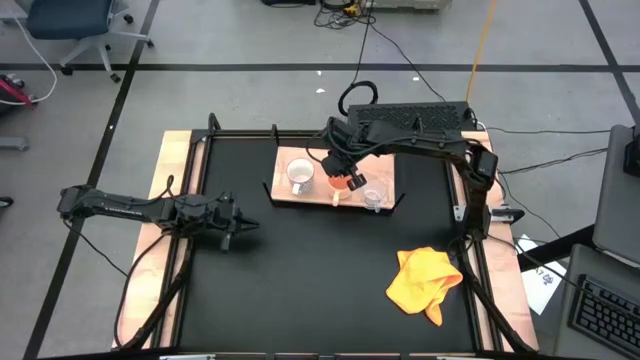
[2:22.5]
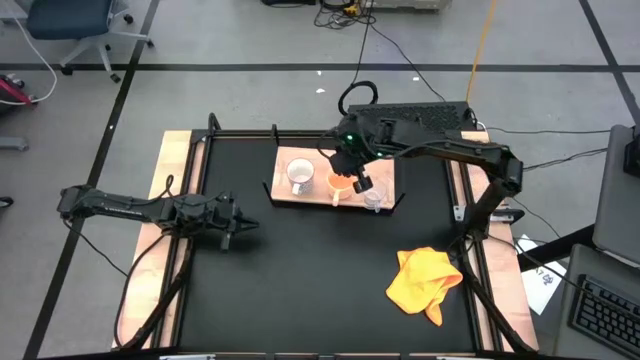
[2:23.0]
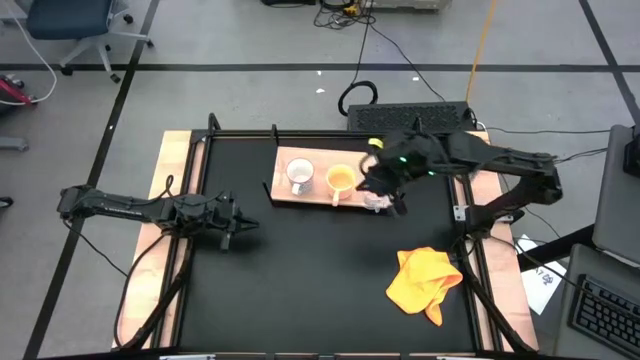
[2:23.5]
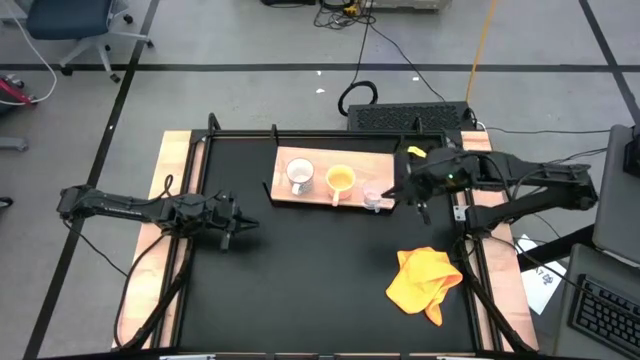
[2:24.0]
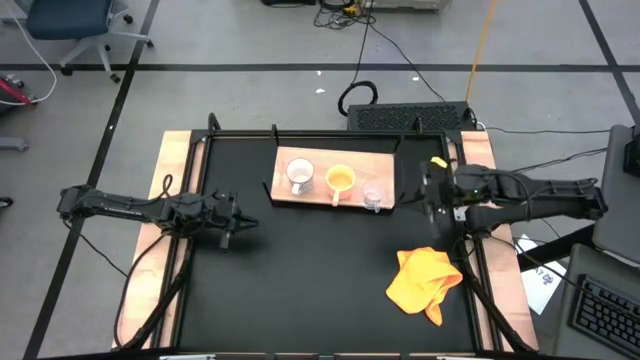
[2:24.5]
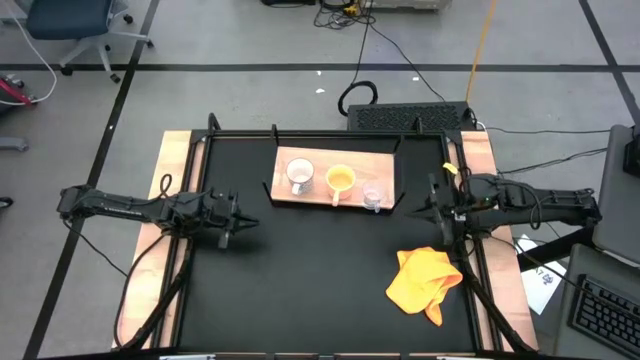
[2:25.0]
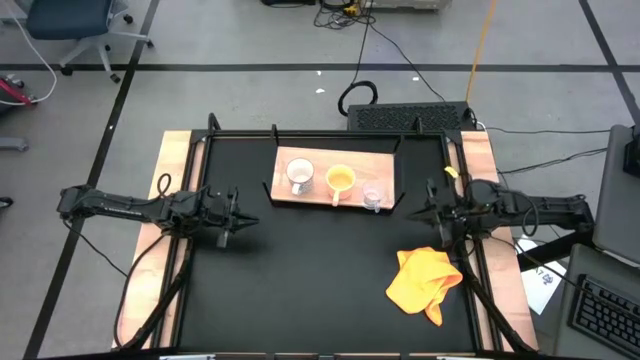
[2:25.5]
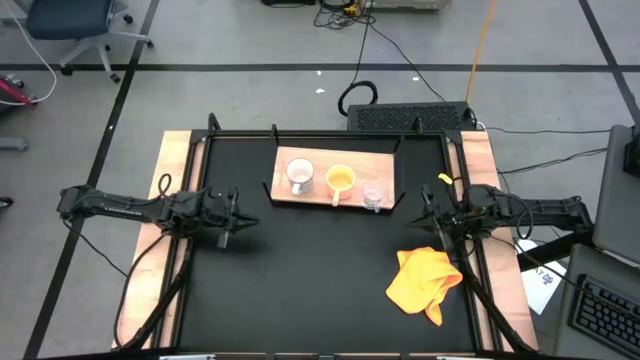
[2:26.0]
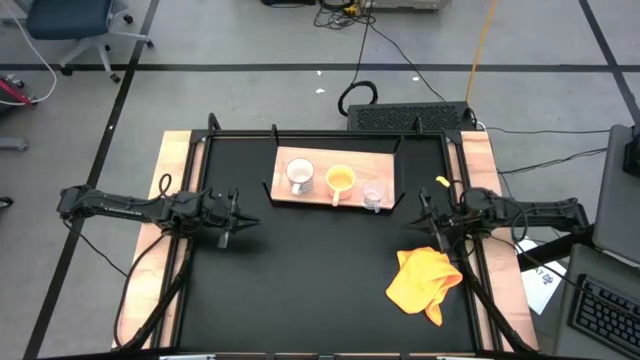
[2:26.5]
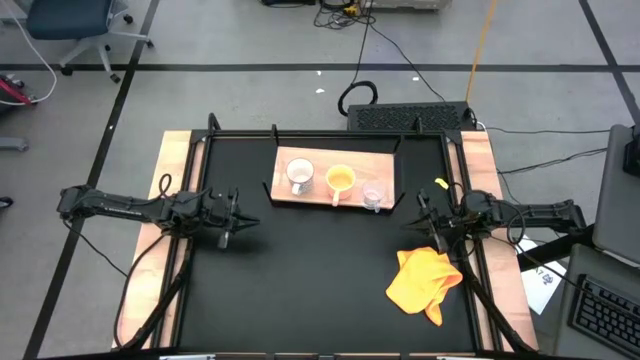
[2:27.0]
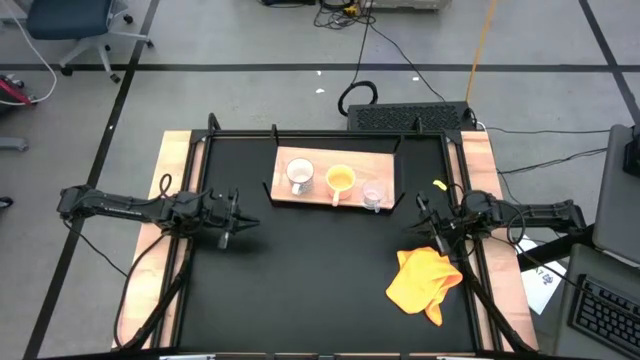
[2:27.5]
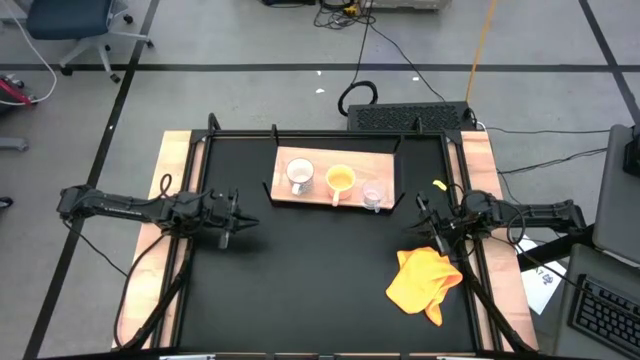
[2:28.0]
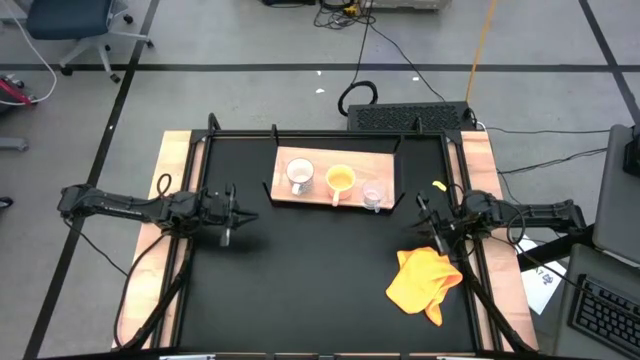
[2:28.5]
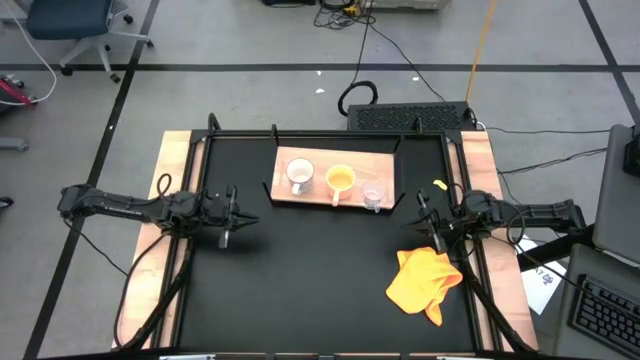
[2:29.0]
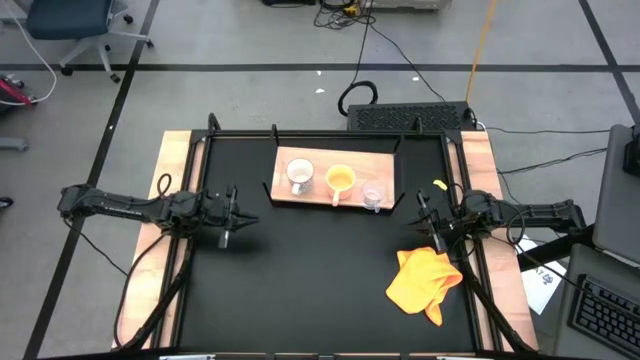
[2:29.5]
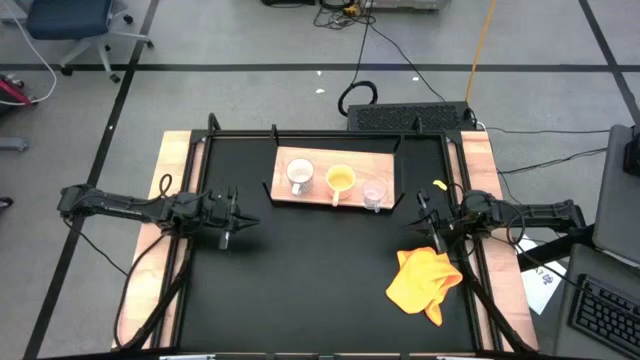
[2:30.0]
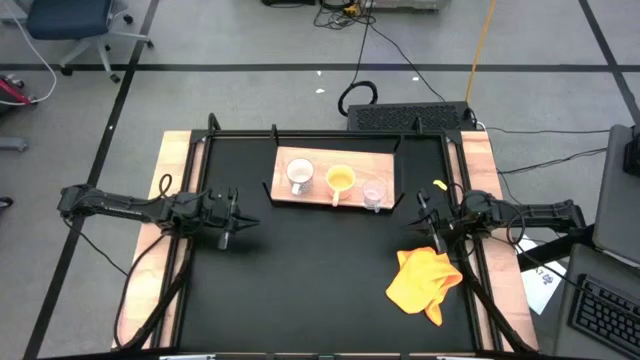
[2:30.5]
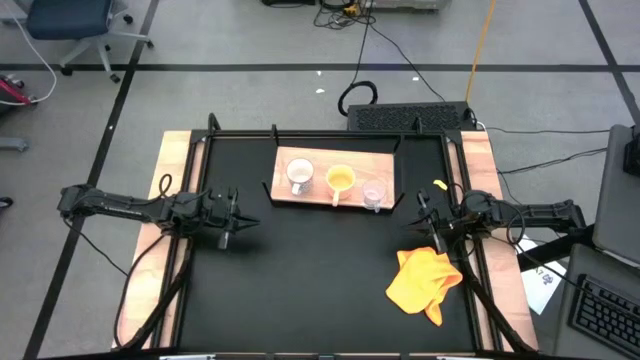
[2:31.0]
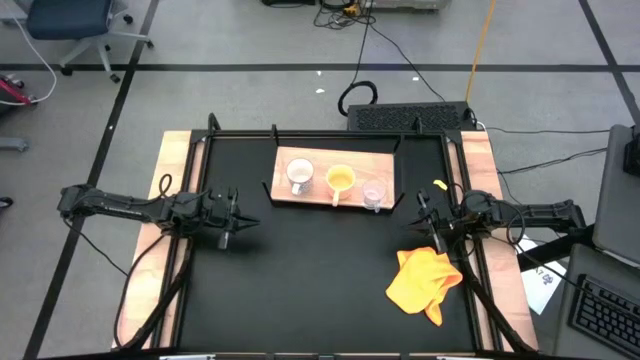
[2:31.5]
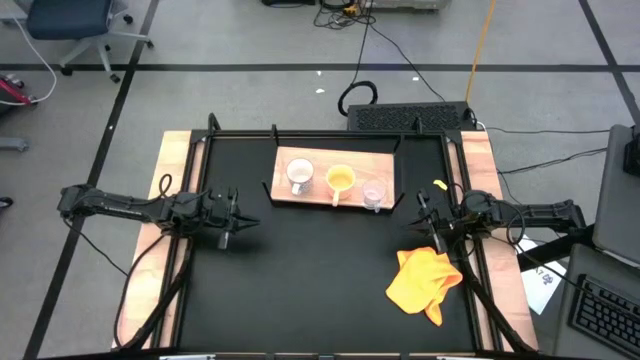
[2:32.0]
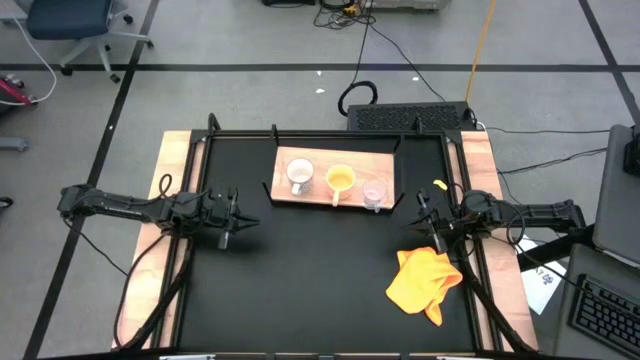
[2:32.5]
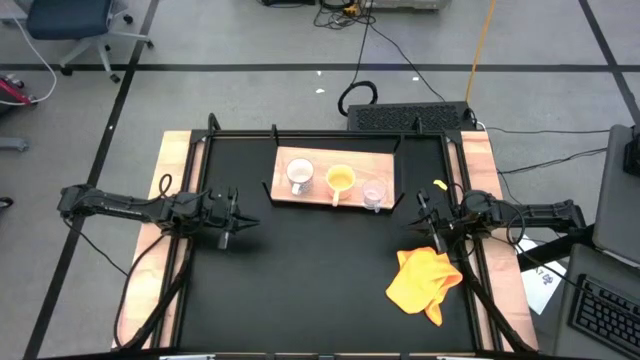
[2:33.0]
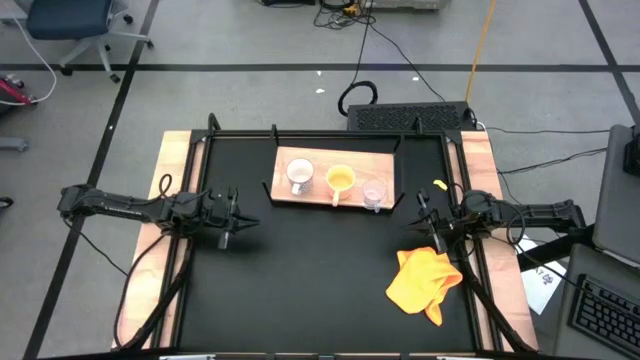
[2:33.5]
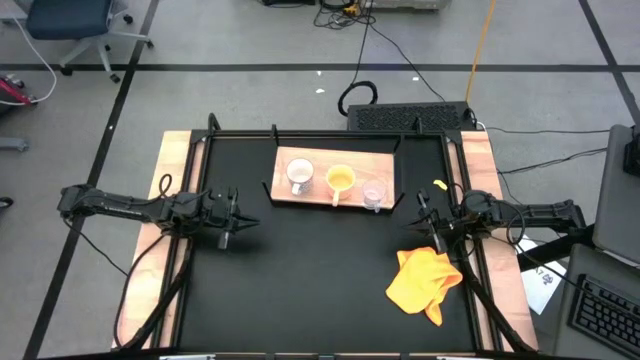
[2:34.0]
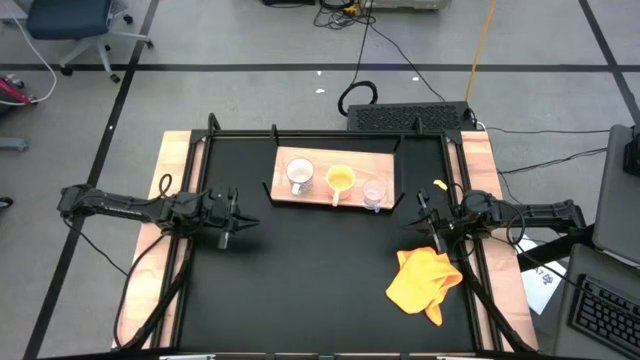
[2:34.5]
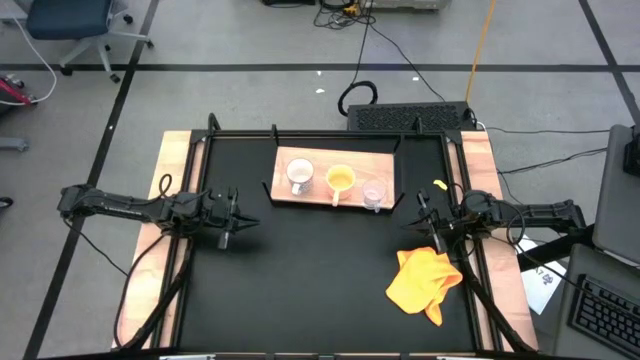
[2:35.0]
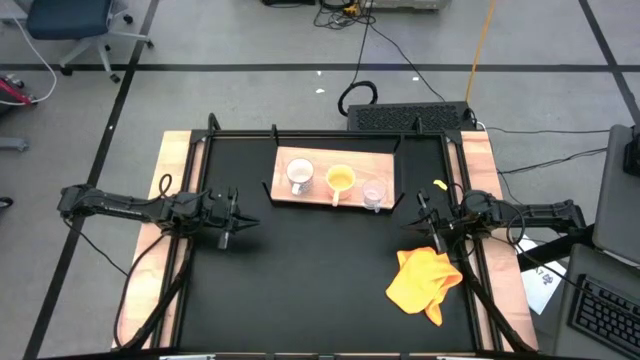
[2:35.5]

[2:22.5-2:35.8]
Task: Stack small to large cups/mugs on shelf
Return to Home Position
